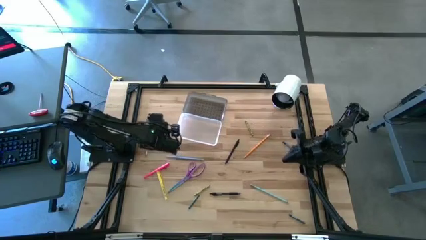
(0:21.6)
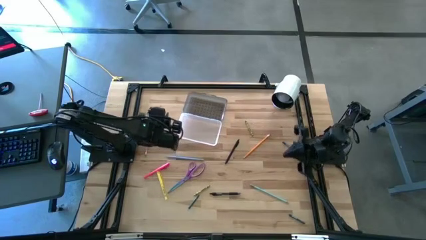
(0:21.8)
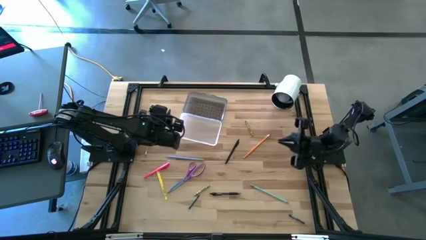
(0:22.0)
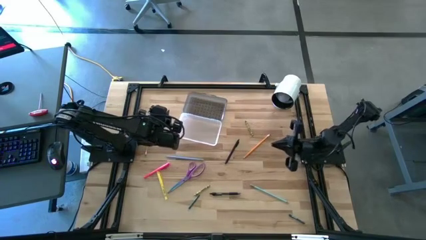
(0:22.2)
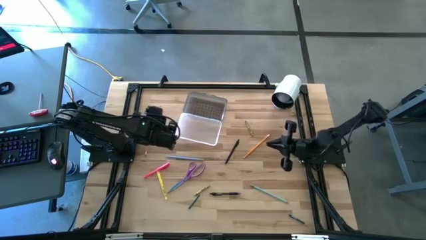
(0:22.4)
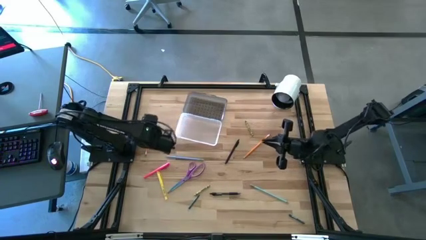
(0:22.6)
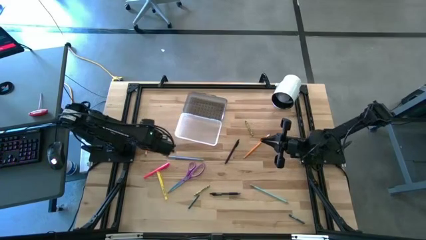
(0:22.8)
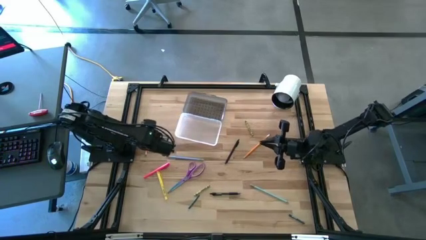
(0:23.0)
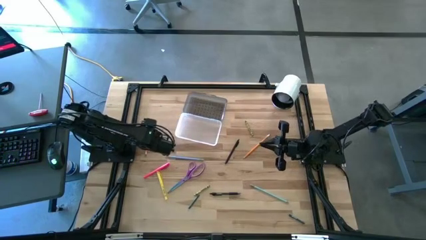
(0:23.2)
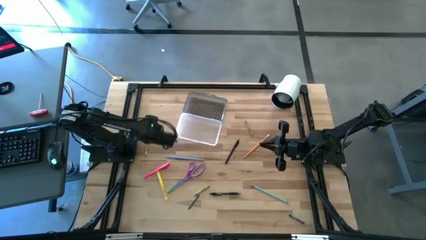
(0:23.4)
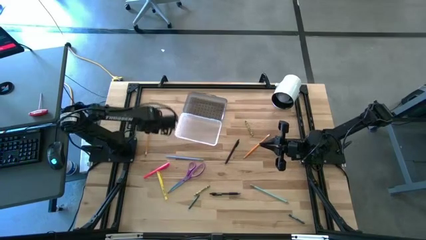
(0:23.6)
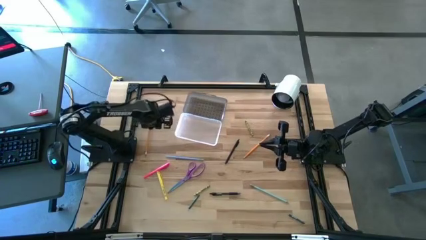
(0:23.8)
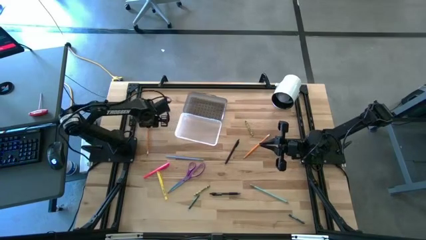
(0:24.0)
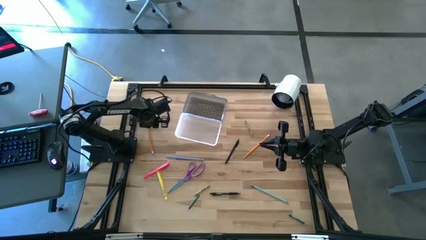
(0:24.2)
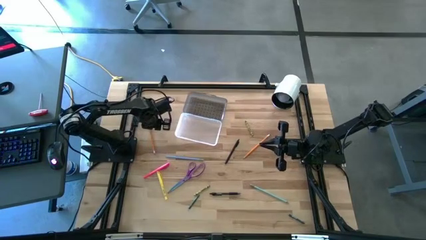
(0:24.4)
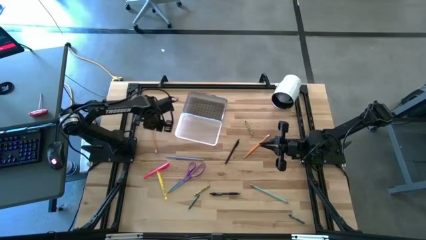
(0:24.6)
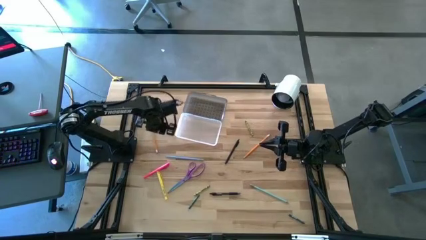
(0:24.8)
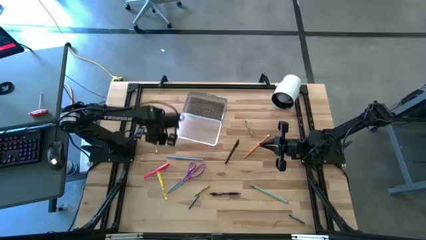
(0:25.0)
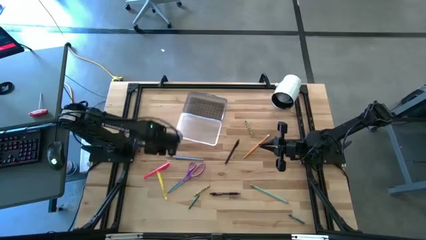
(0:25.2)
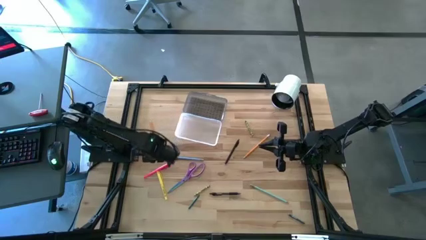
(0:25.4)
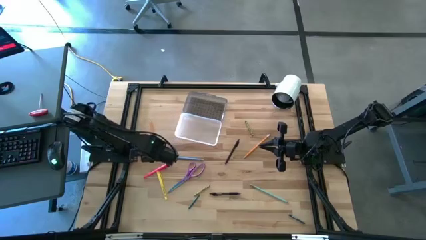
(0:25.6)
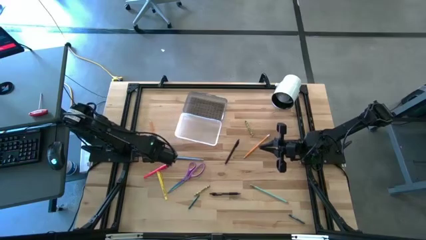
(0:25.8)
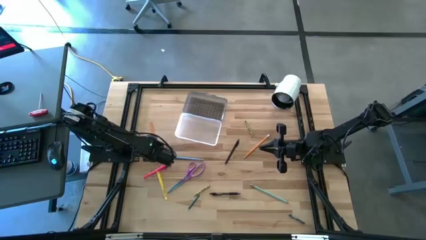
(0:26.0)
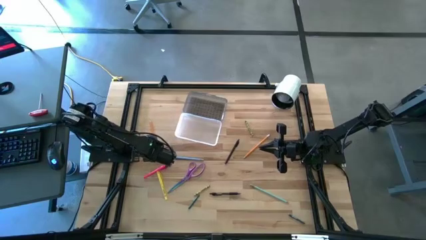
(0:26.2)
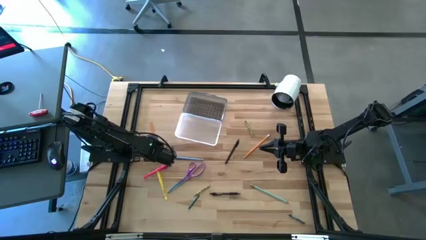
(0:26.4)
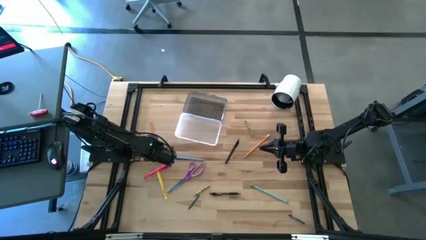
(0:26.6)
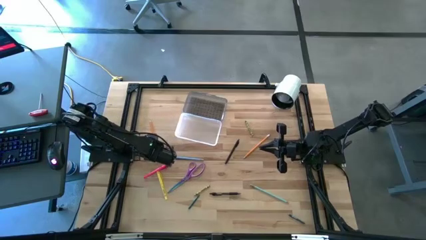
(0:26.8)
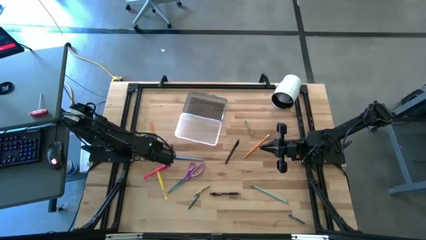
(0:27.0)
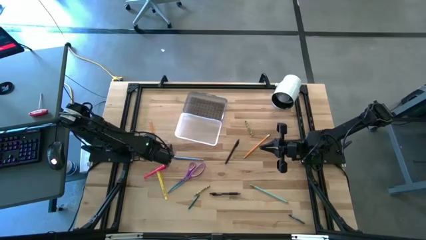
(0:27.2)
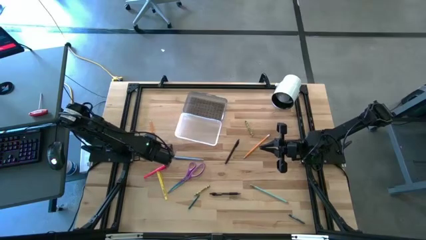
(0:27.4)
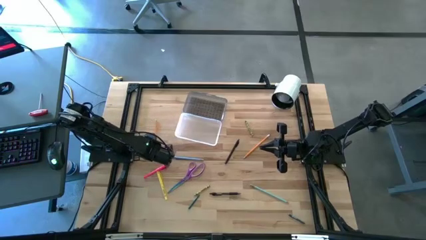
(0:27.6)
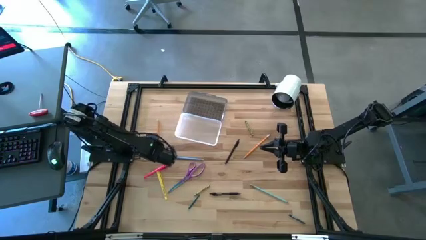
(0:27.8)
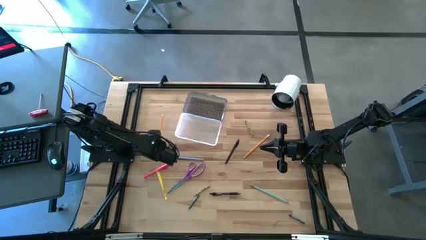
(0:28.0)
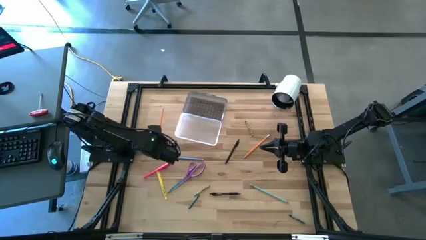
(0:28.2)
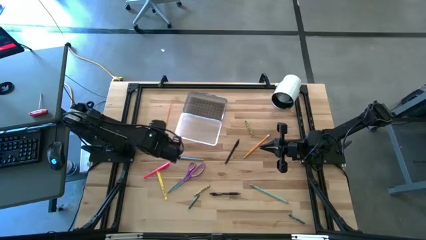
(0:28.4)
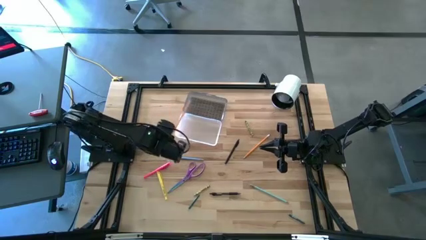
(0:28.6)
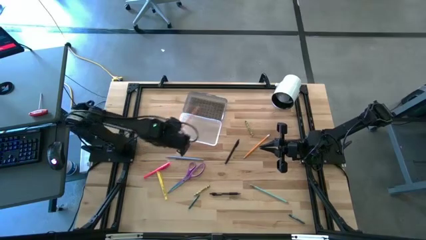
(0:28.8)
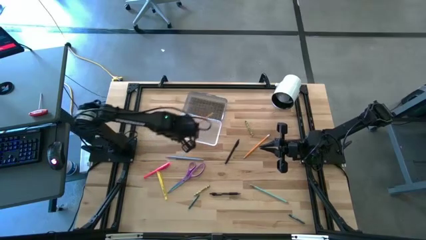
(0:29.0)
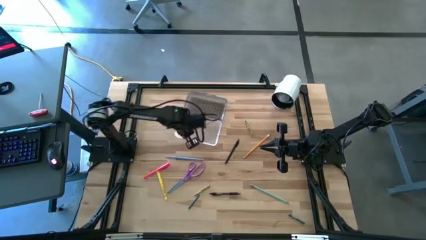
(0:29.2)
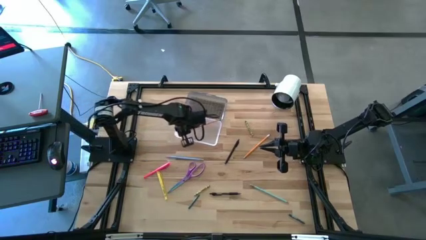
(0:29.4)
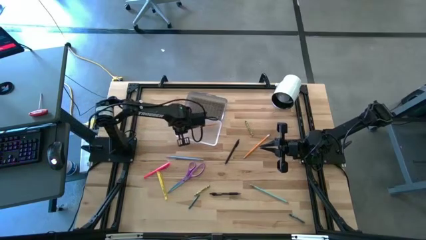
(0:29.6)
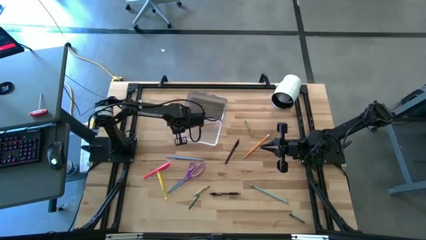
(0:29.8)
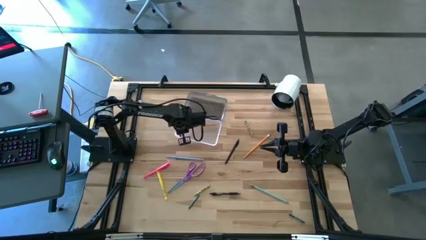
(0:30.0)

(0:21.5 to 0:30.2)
Task: Pick & place school supplies into a supply box
Put the orange pencil into the black supply box

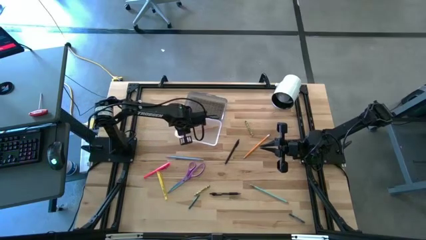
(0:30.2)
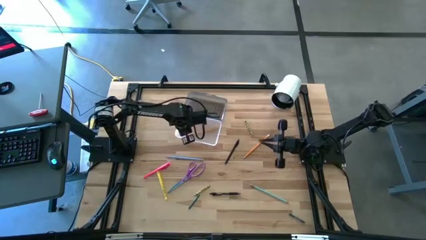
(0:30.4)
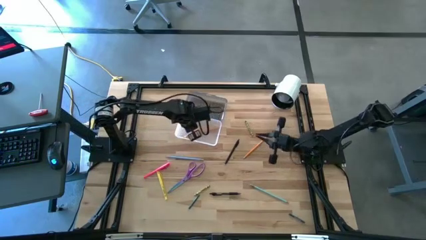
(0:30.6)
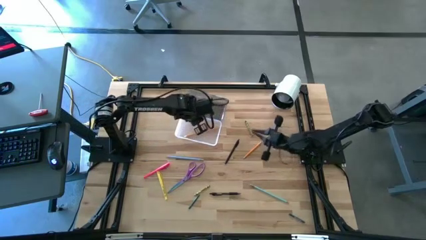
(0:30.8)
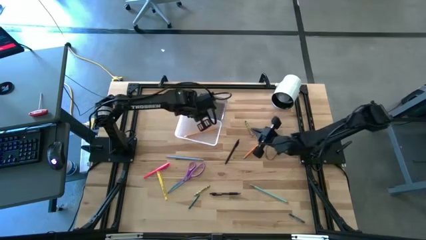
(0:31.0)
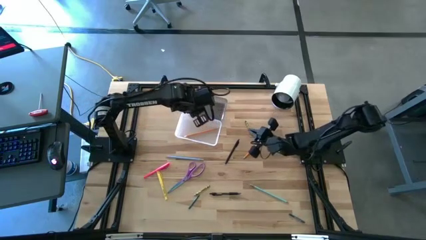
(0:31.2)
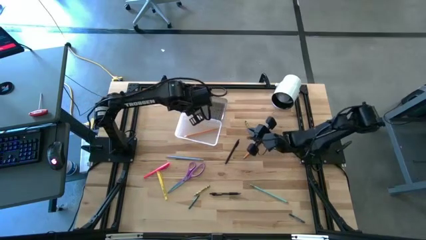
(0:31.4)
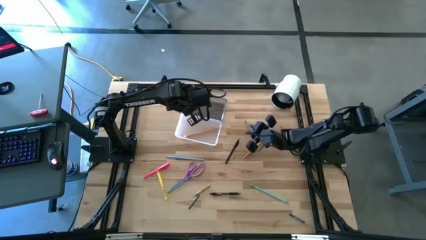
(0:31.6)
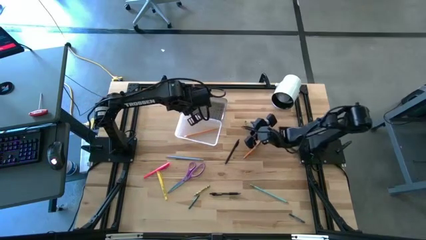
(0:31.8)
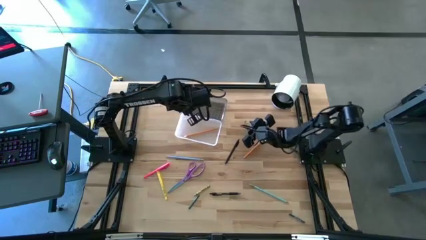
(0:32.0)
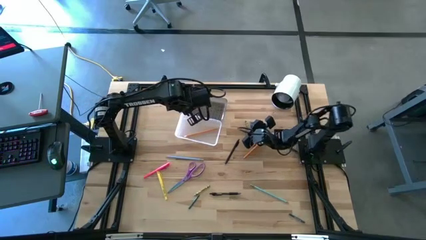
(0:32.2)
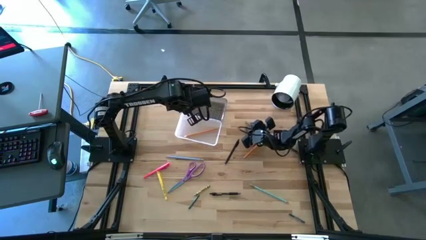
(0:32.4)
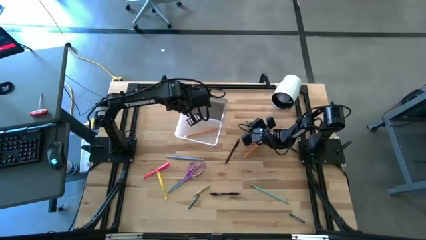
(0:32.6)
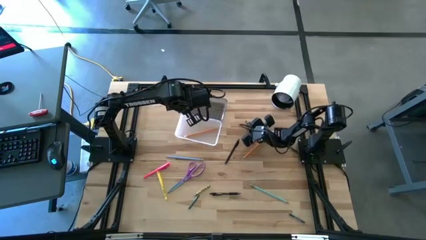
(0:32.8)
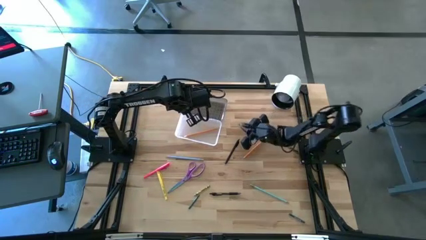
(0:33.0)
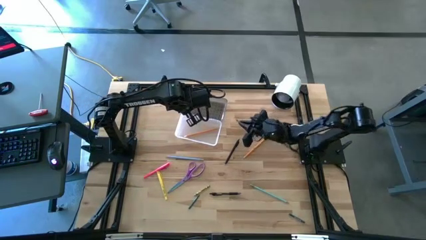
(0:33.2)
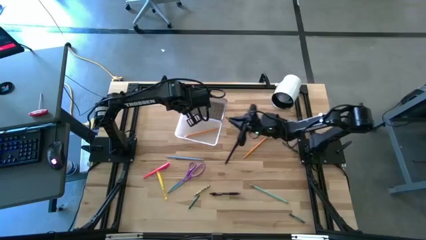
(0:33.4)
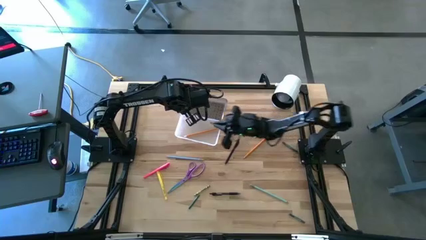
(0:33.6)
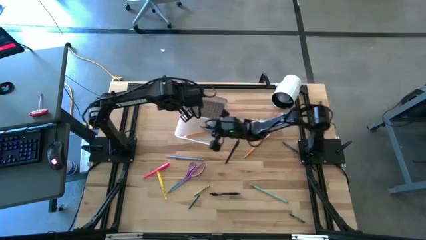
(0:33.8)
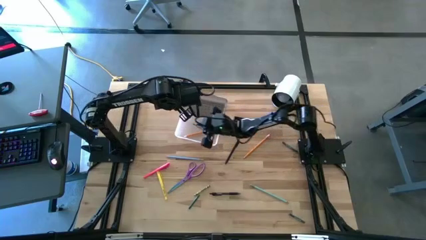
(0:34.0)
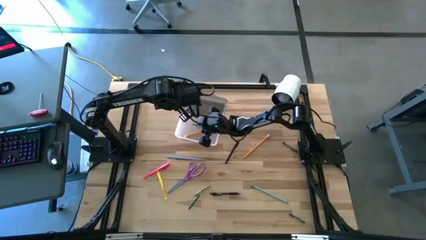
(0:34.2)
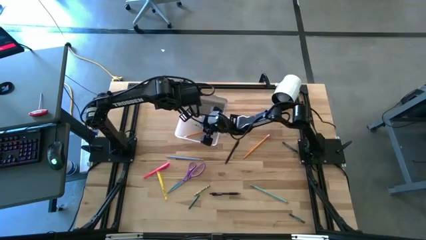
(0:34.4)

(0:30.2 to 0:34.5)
Put the green crayon into the black supply box

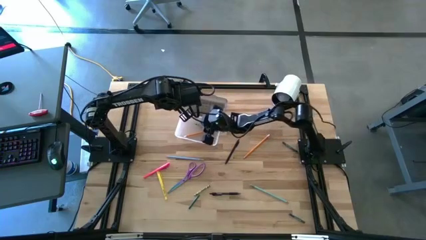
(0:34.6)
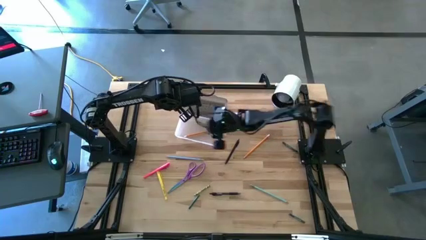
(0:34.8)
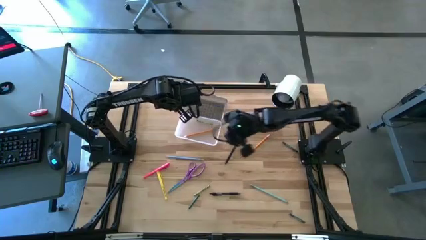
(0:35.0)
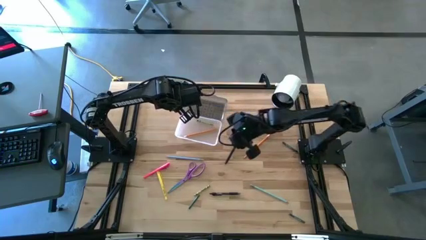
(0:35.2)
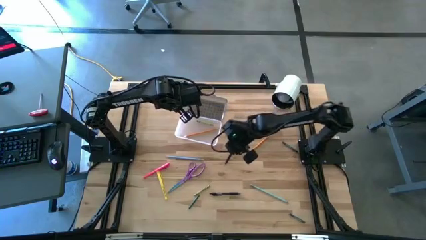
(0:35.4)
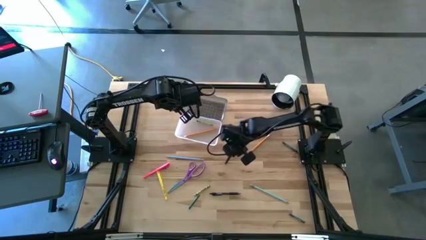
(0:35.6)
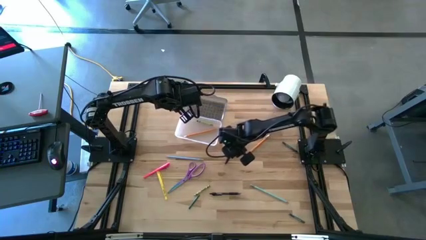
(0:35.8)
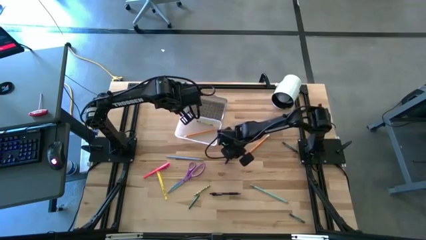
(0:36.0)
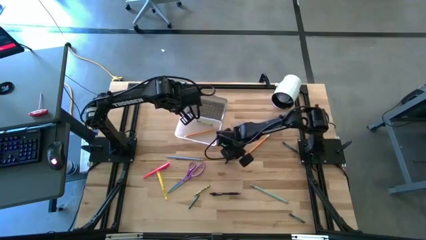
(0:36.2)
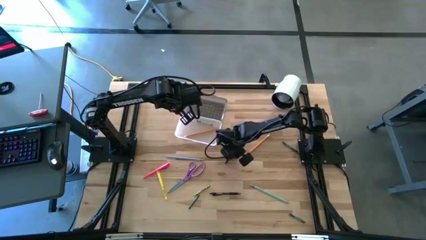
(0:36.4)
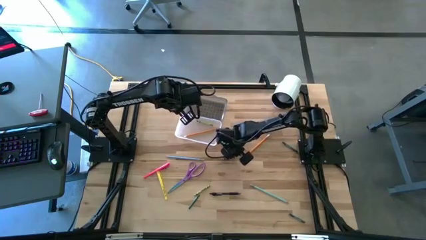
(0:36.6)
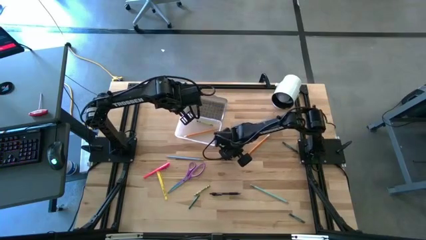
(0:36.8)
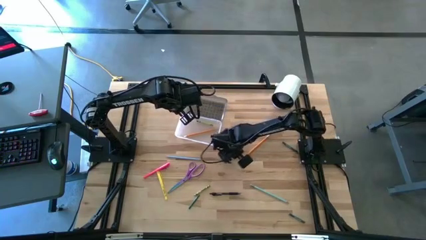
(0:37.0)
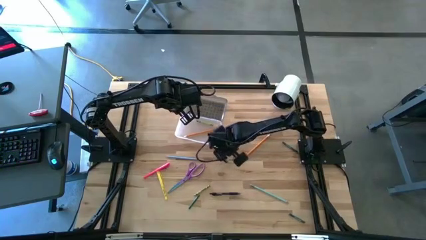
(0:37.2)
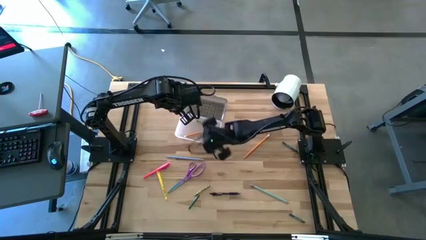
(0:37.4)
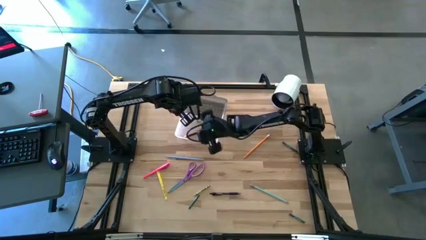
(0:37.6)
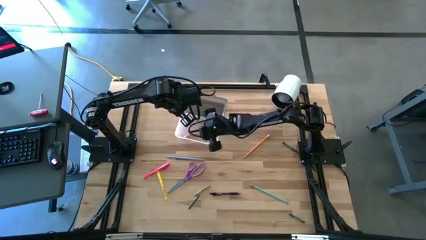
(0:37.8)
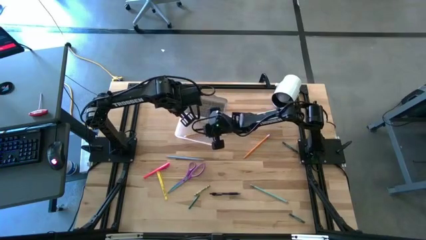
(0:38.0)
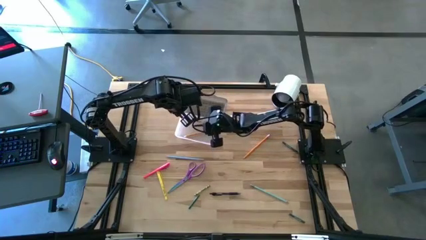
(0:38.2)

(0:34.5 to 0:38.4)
Put the black pen into the black supply box

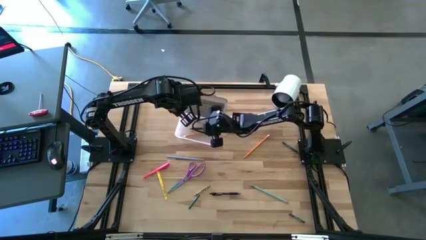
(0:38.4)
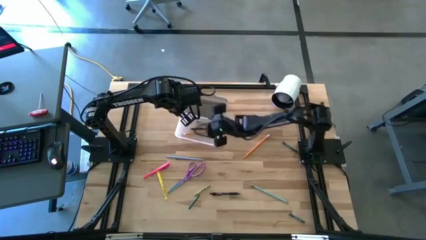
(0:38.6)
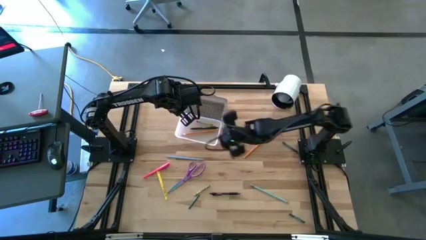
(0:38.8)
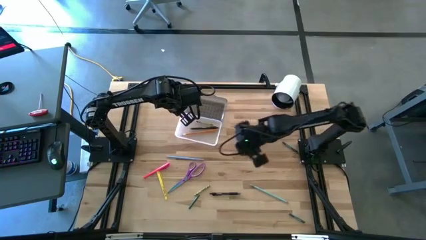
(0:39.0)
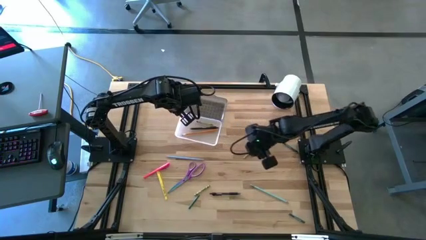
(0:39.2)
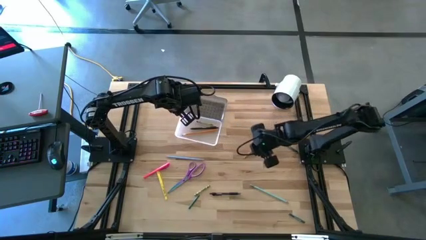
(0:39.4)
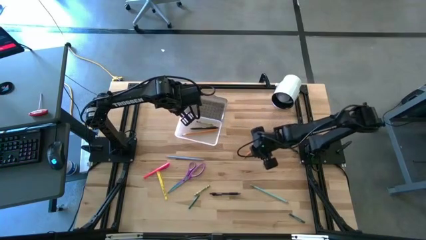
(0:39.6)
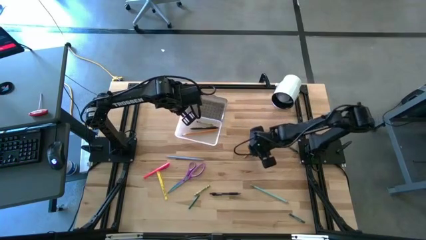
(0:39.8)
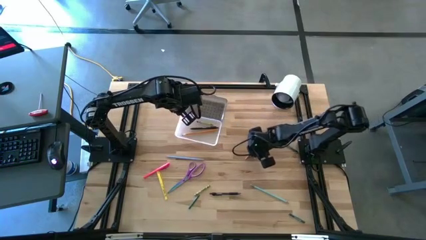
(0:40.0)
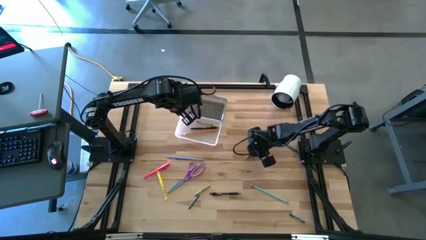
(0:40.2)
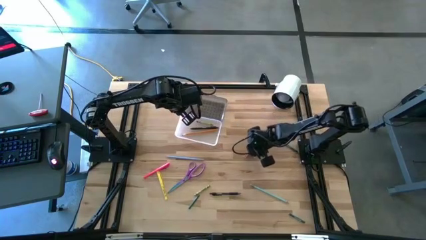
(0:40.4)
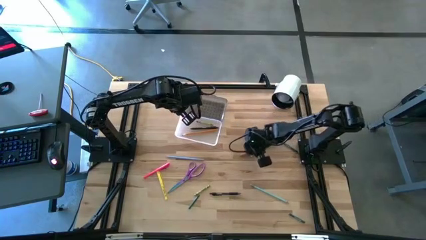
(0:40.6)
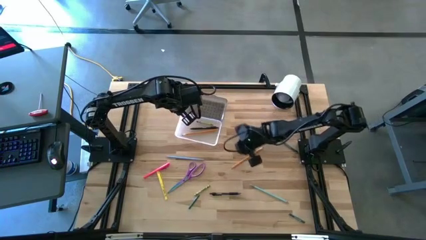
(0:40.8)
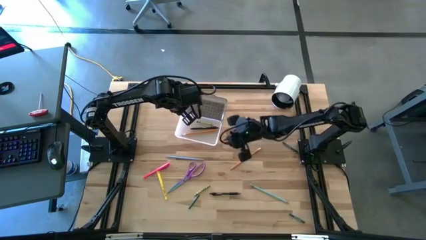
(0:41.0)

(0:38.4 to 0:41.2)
Put the orange pencil into the black supply box
